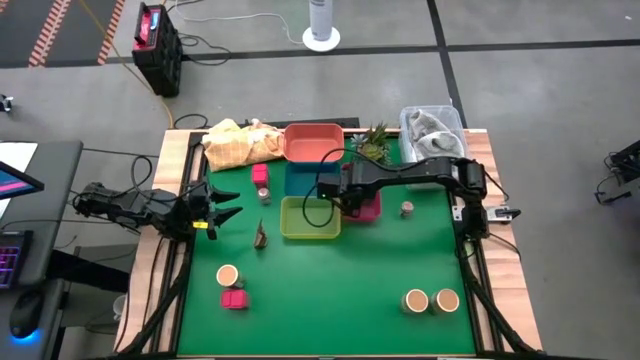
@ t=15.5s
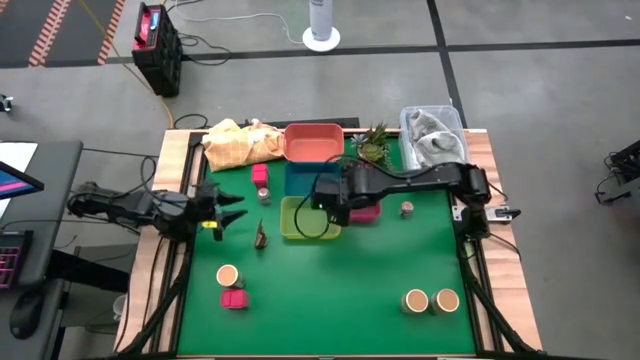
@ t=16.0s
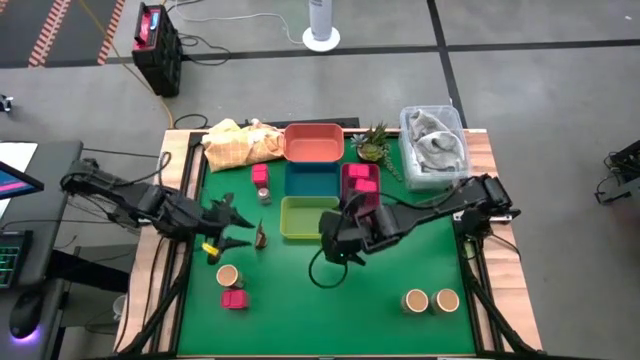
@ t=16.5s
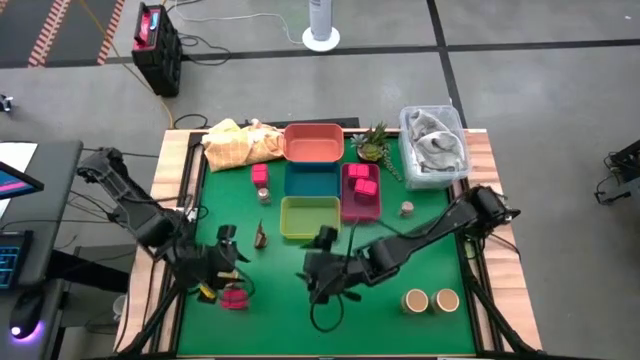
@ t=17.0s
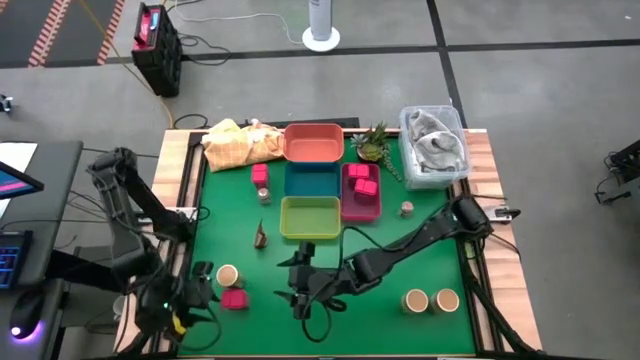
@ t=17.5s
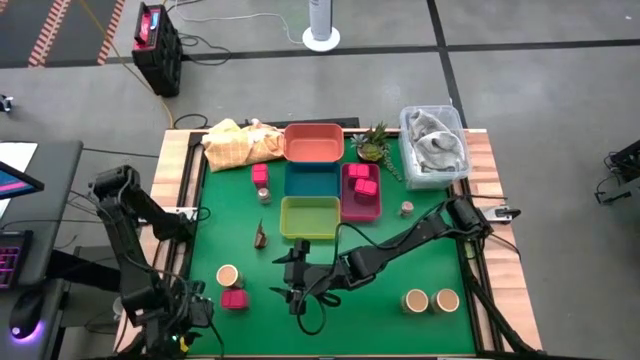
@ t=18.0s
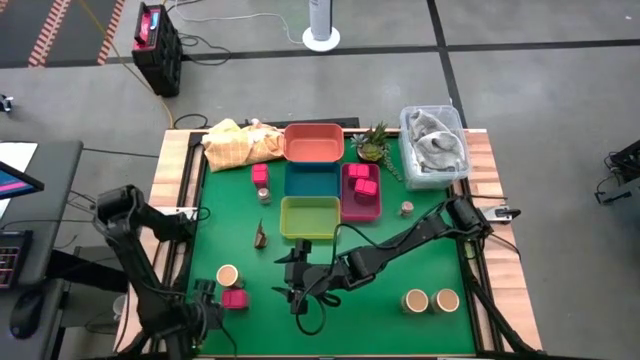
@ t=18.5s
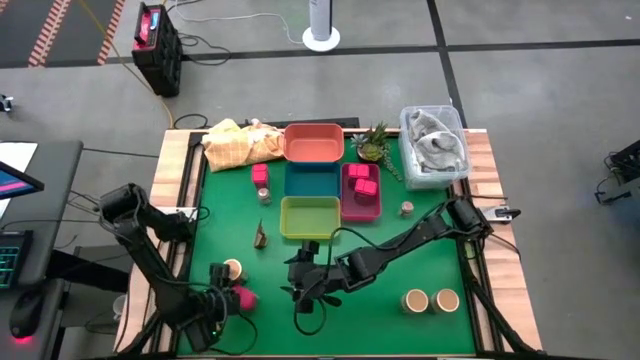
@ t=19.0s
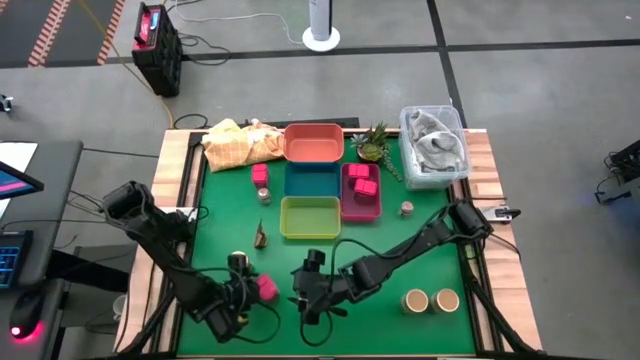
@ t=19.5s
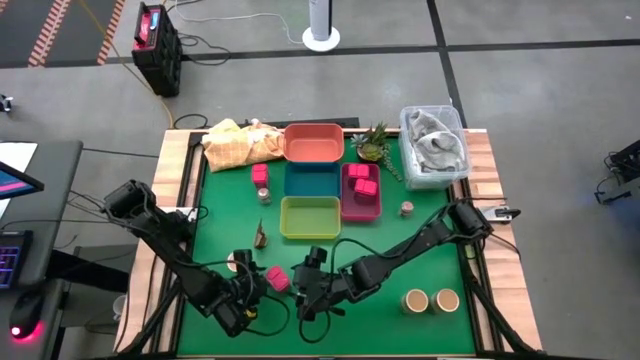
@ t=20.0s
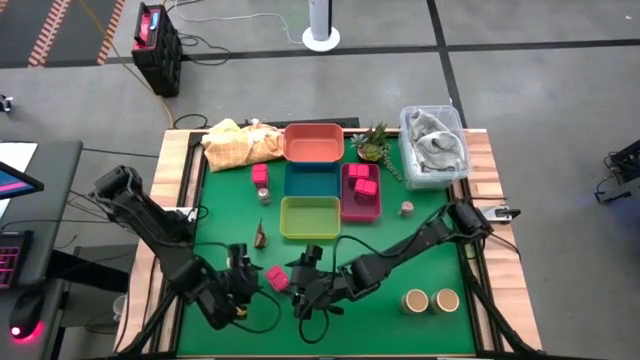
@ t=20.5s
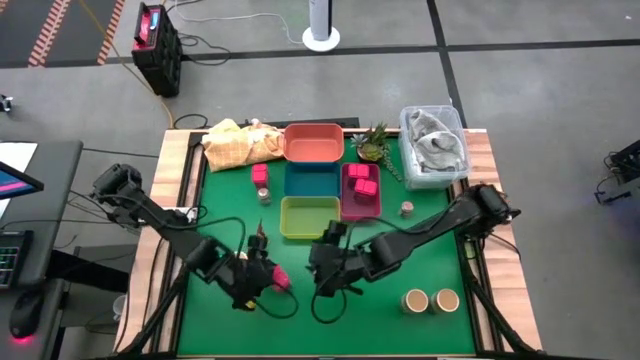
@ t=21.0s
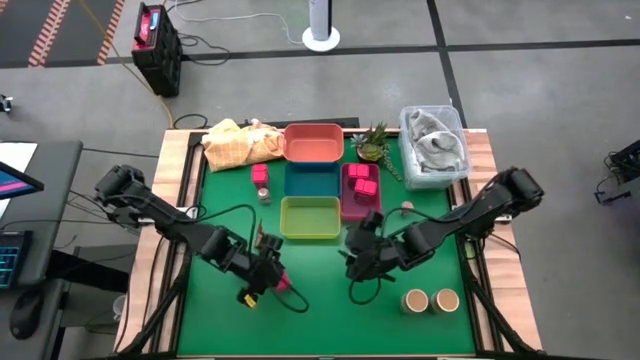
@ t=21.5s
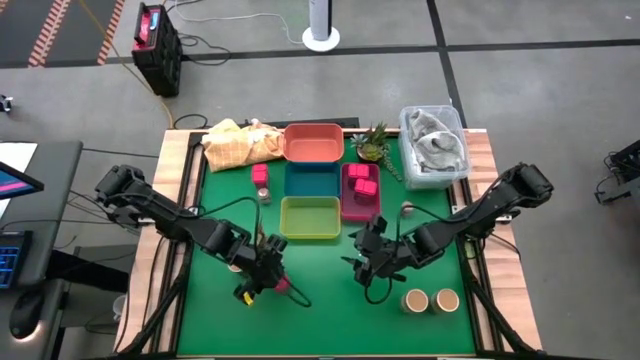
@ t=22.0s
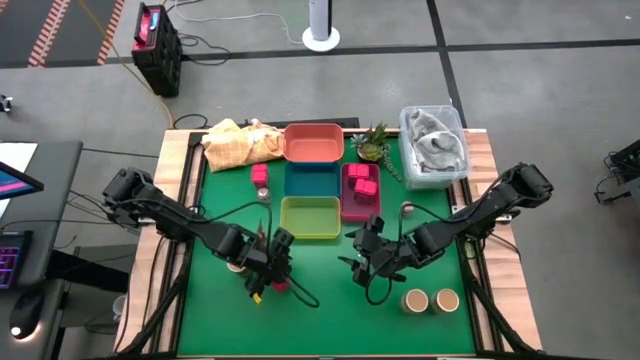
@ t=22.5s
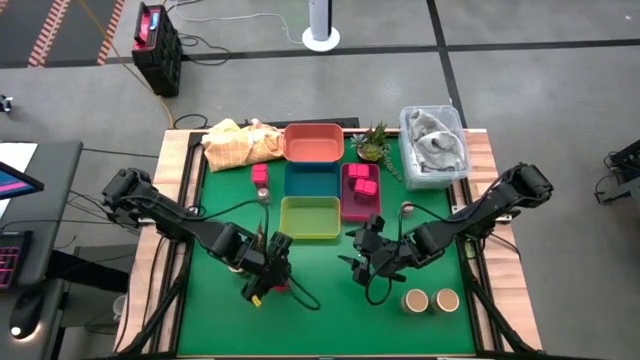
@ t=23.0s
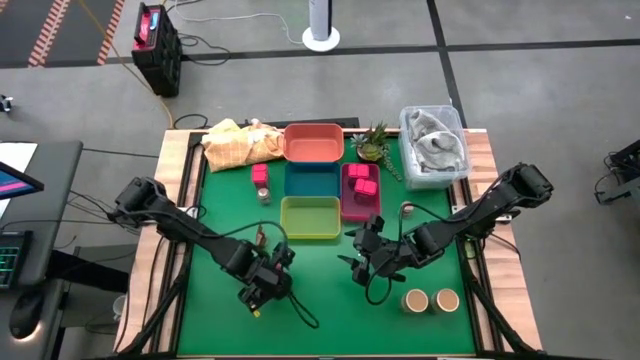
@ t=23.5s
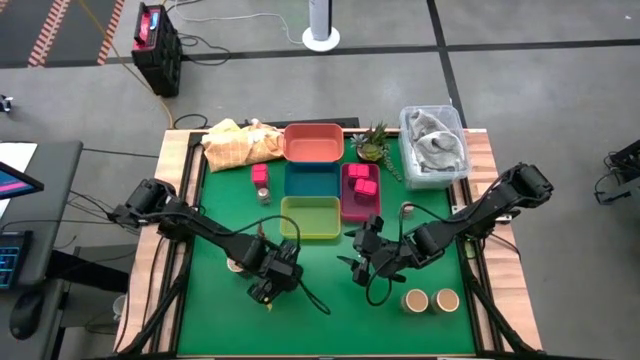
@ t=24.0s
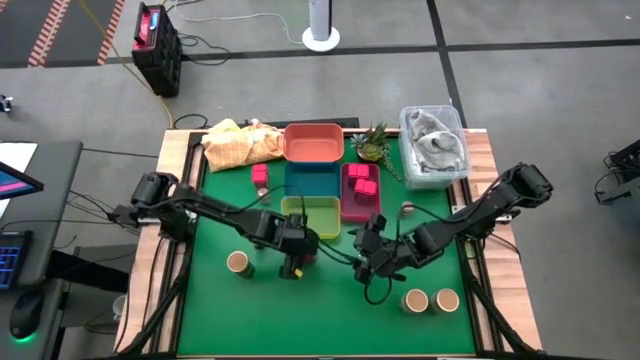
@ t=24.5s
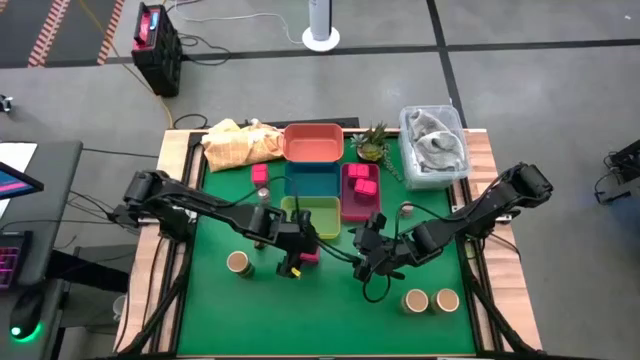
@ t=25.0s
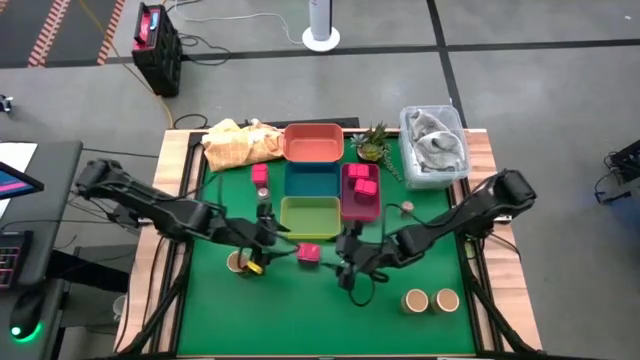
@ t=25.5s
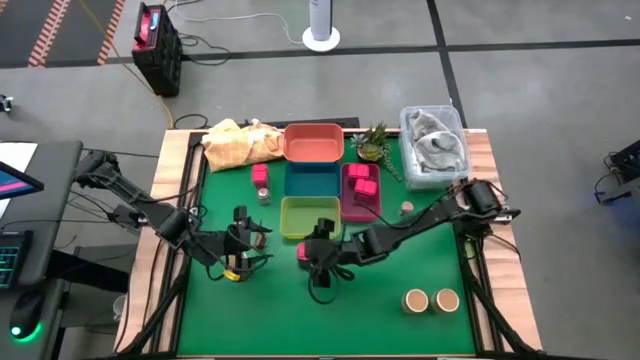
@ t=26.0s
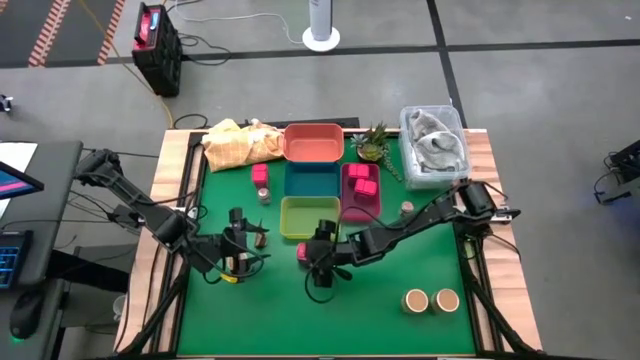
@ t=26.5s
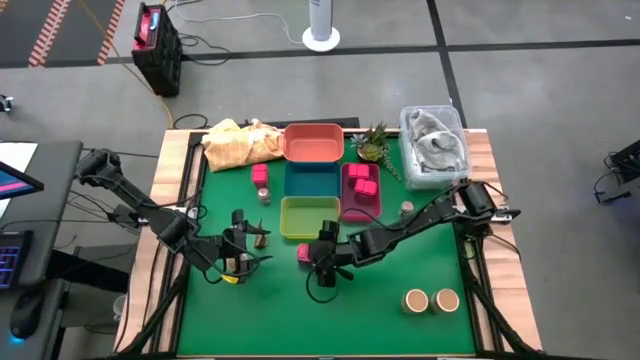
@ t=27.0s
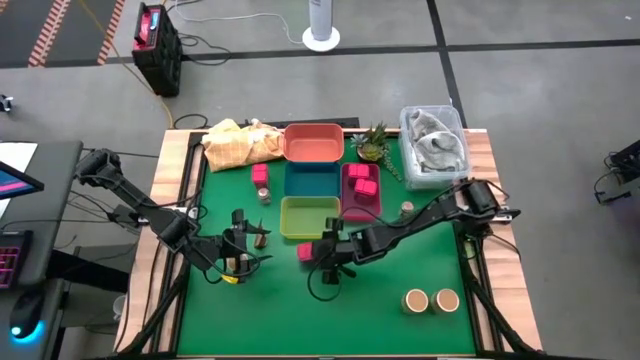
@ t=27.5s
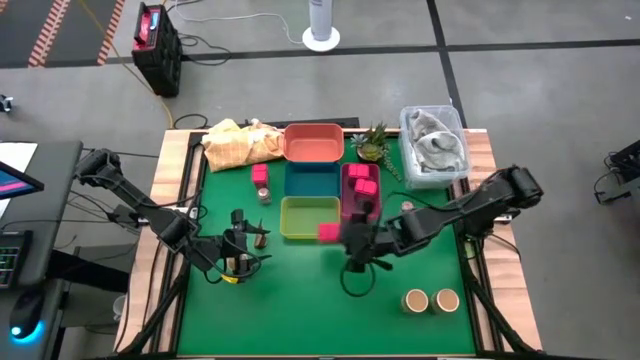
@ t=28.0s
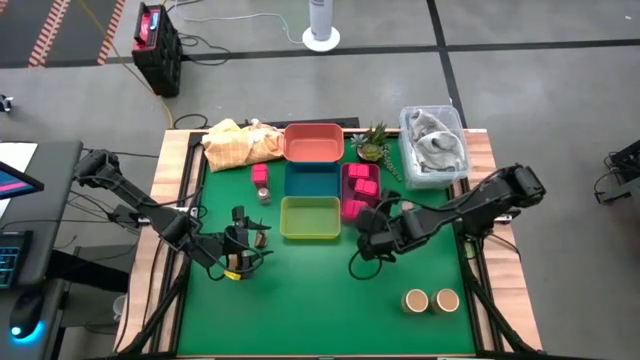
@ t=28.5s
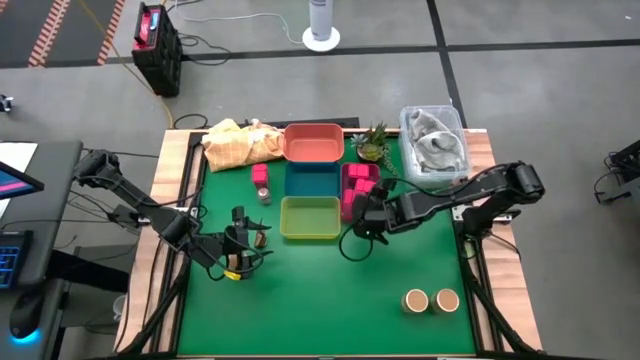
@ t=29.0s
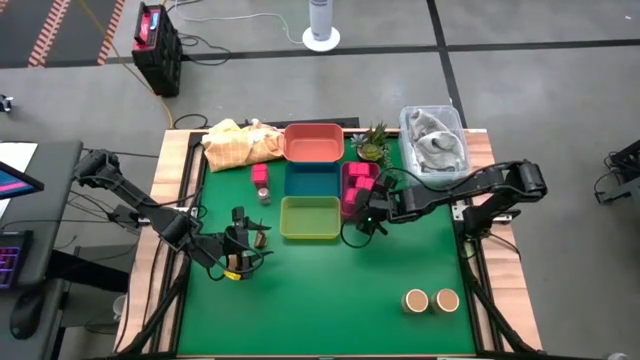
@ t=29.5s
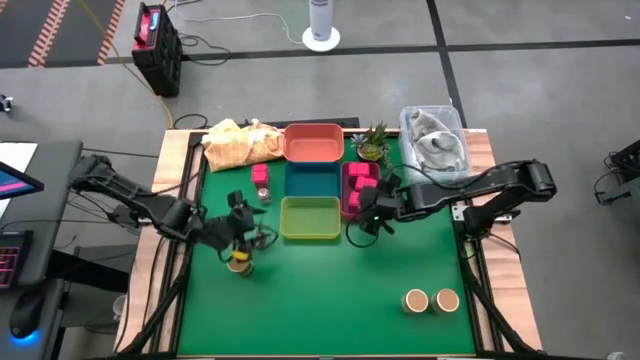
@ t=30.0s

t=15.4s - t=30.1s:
Task: Sort spices by type
Put the bottom red seasoning can into the red bin
